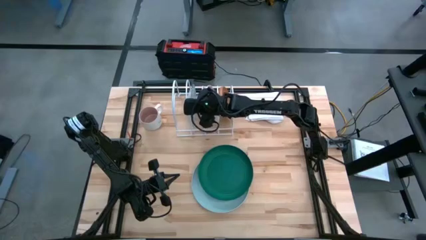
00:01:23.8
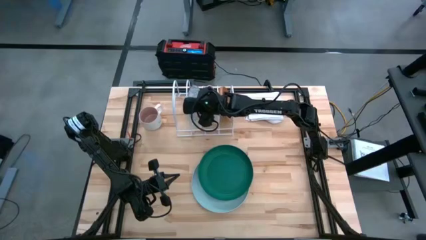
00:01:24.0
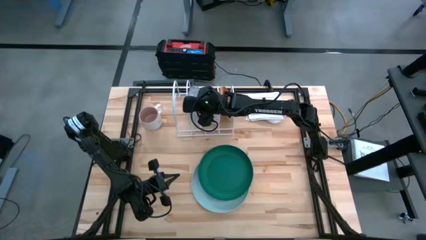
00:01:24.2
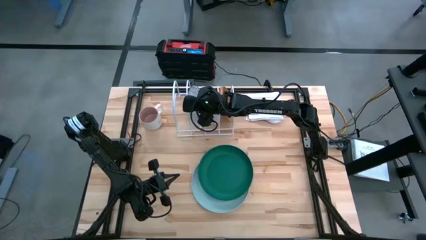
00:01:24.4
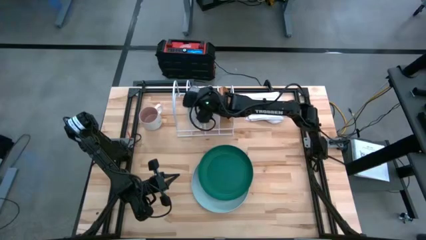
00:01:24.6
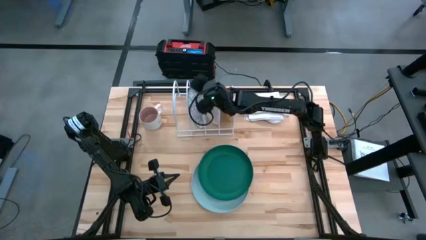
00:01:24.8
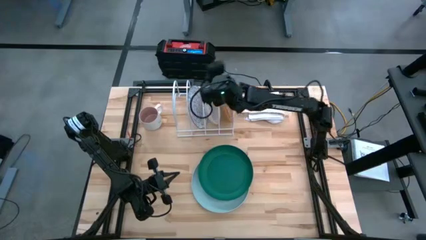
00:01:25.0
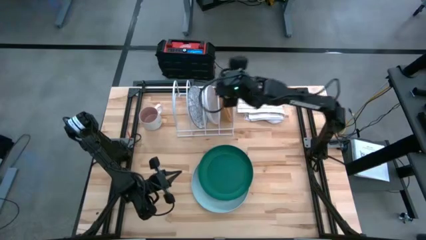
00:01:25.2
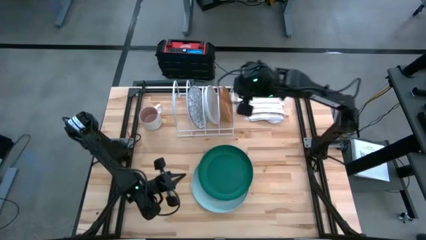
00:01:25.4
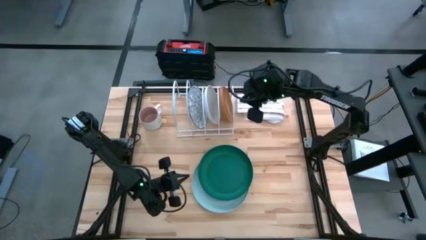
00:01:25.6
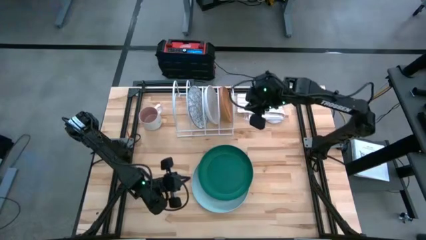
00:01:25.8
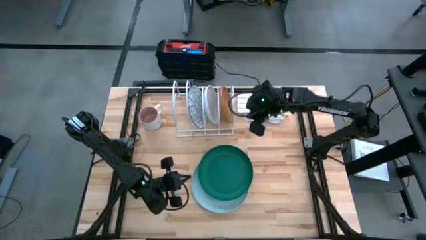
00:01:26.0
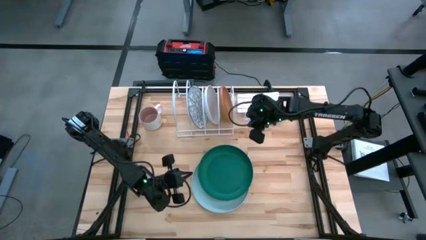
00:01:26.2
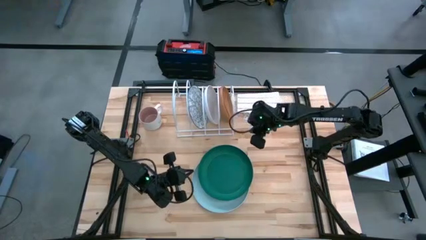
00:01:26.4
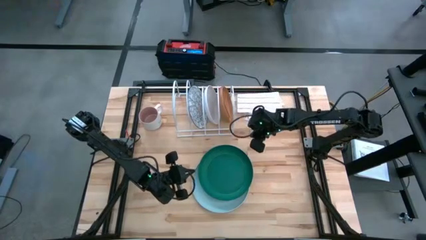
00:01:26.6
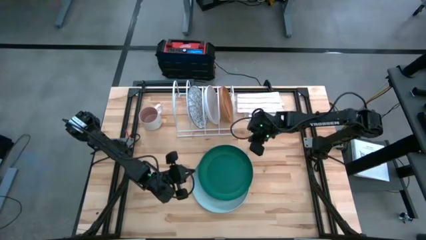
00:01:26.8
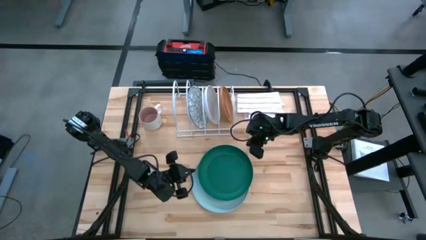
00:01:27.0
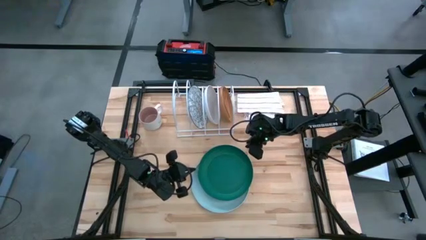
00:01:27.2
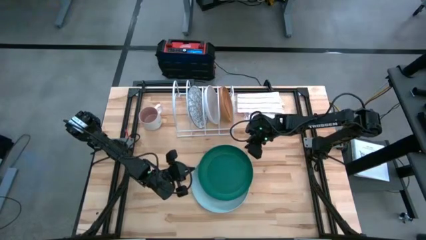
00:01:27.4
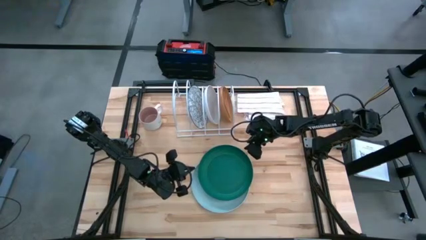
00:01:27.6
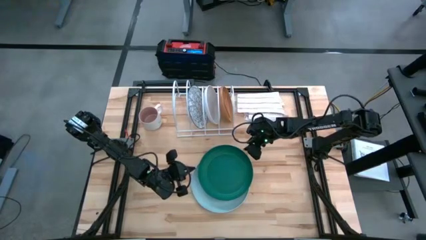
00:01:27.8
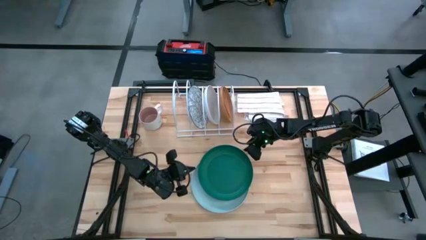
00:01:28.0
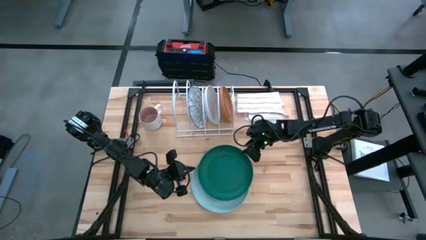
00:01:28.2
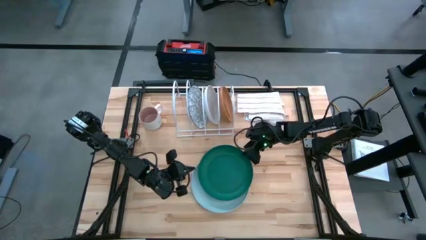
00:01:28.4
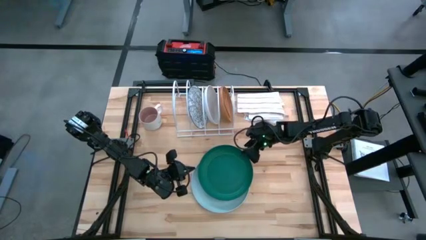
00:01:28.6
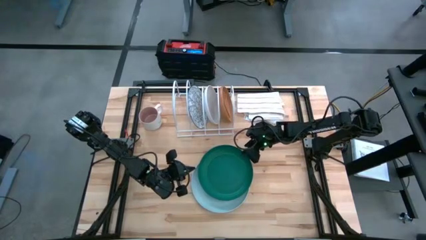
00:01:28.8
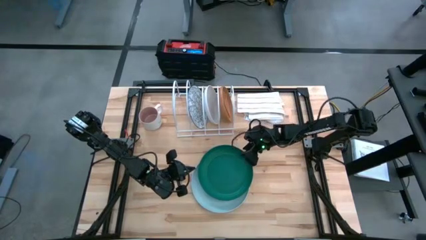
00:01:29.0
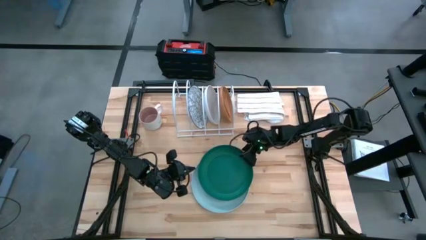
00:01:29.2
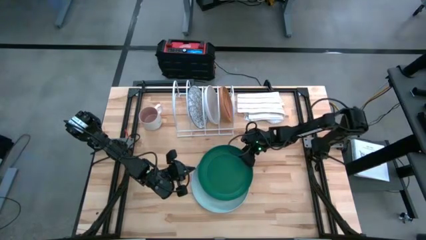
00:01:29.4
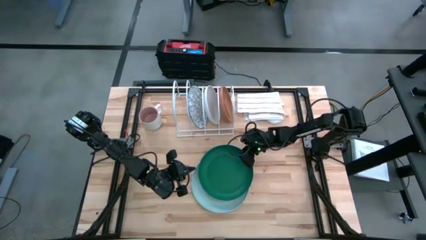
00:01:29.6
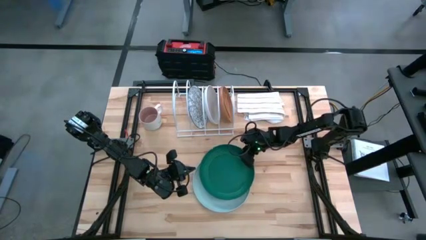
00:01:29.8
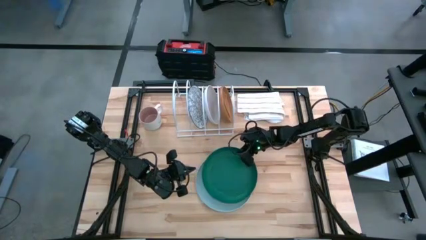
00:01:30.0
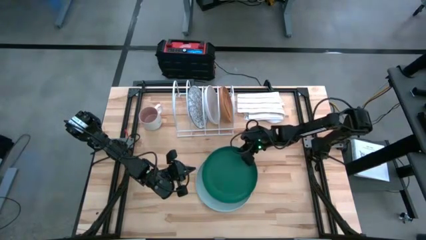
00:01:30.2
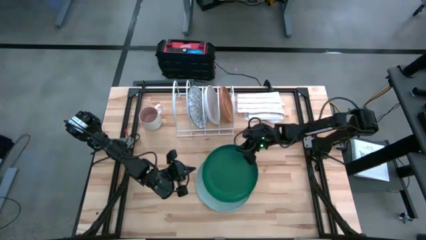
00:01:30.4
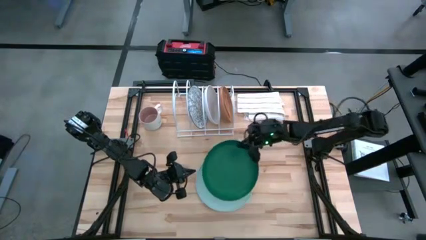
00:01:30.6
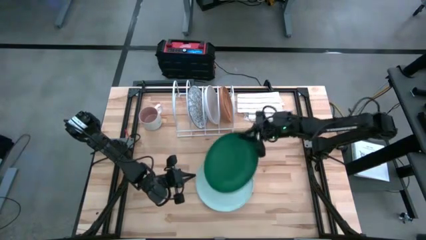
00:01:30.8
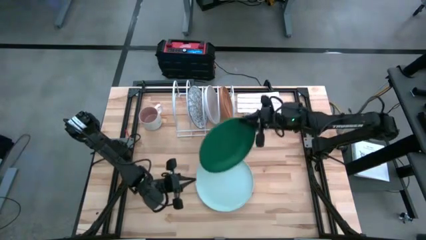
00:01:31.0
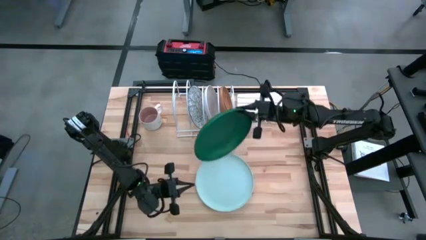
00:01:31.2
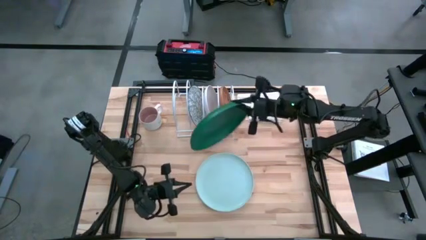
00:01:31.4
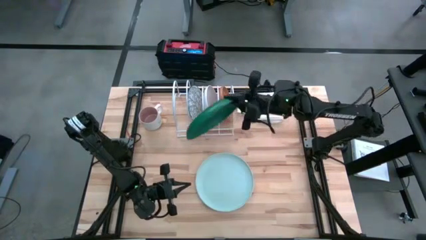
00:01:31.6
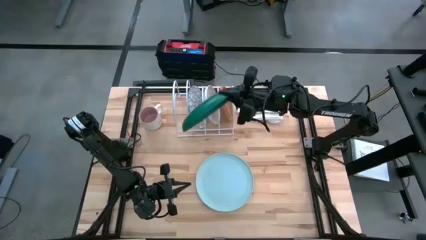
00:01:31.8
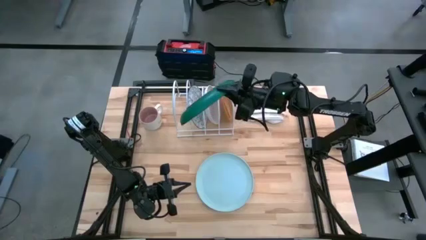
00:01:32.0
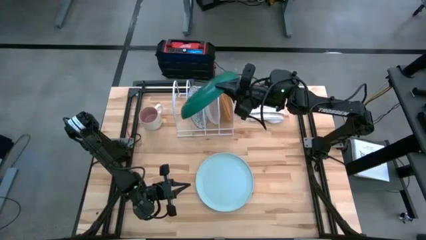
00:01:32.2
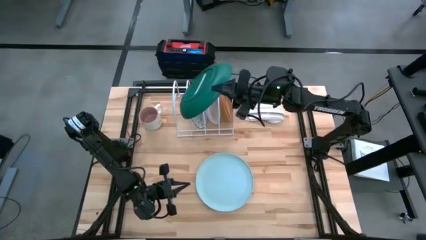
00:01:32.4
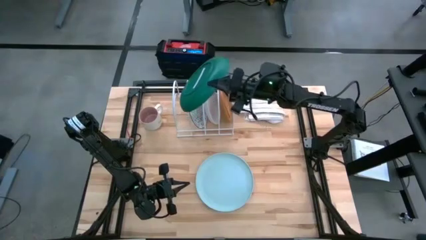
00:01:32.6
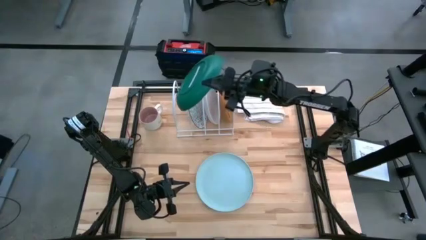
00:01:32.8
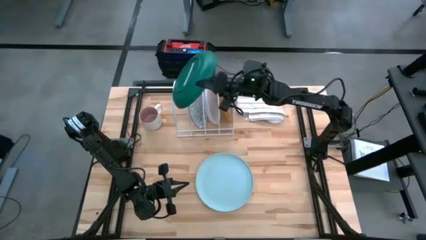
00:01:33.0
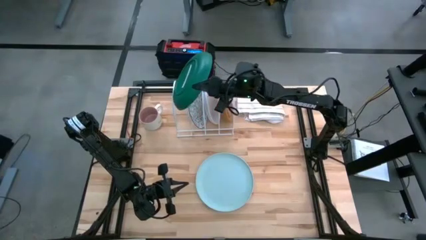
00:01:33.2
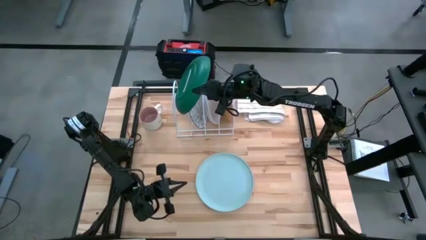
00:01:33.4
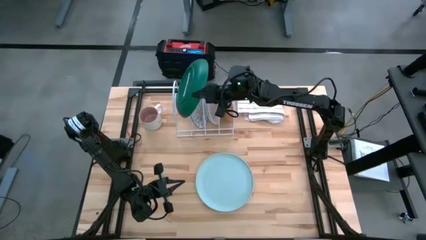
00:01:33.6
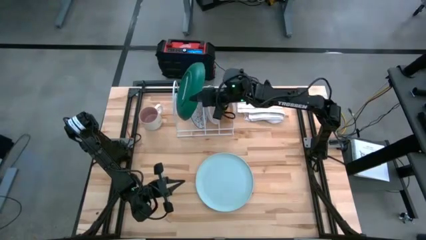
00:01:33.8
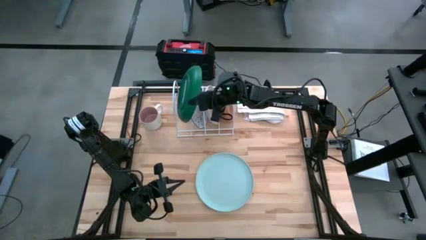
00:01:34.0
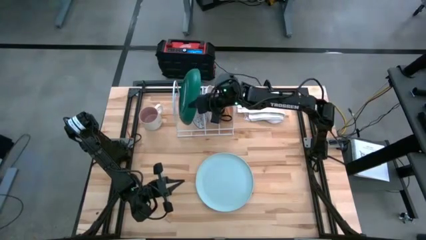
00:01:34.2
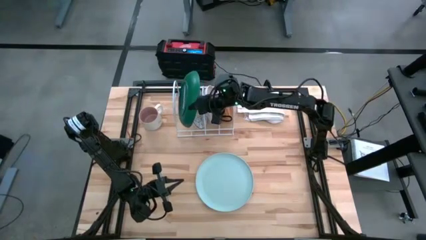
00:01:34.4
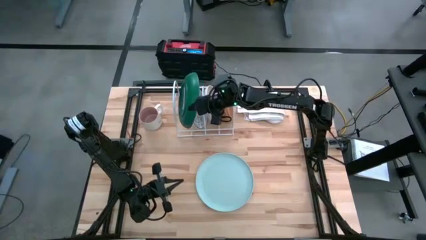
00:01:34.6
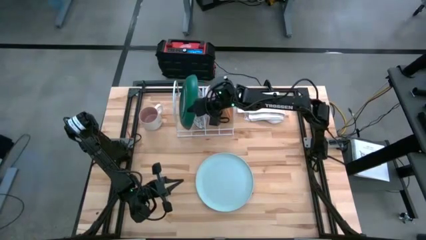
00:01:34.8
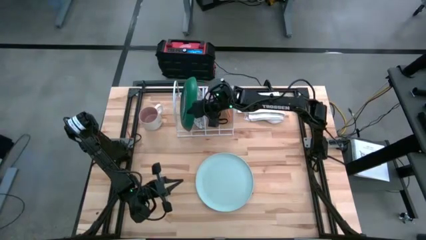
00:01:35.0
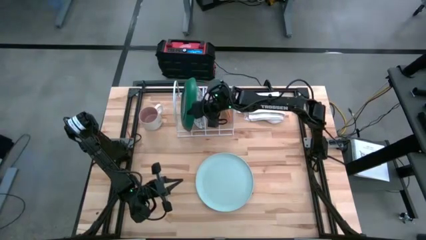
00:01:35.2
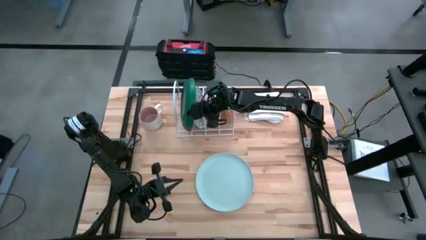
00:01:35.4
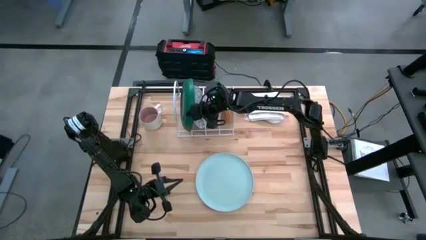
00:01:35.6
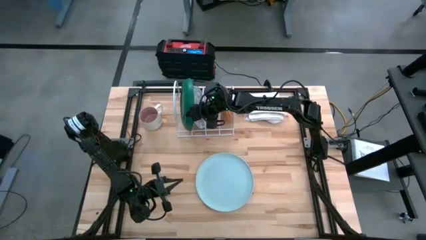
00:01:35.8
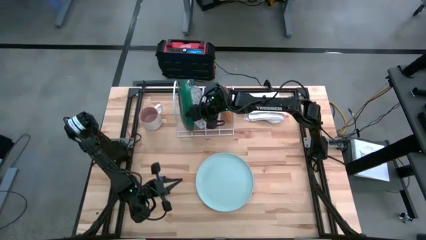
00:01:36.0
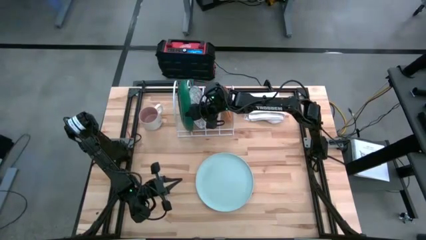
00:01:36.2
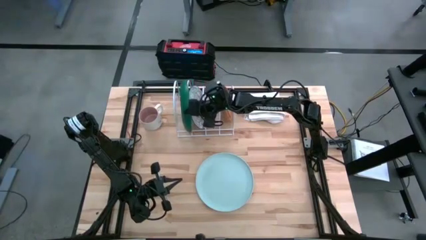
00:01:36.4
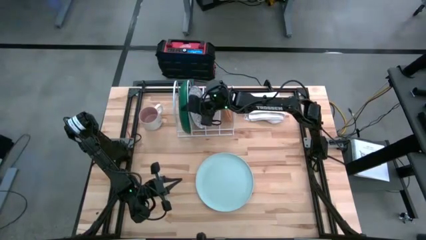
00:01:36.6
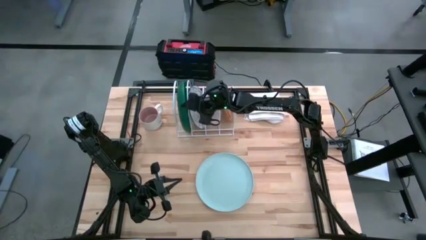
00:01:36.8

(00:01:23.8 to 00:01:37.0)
Task: Sort dishes
Put the green plate into the dishwasher rack
